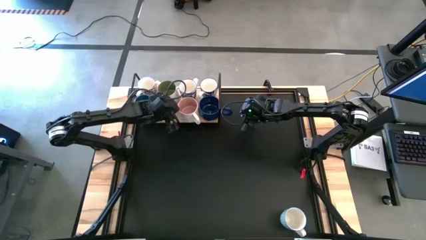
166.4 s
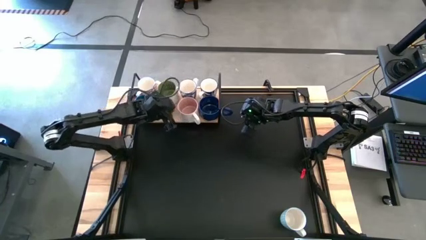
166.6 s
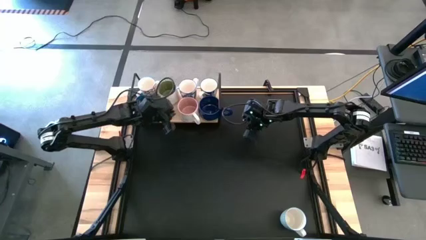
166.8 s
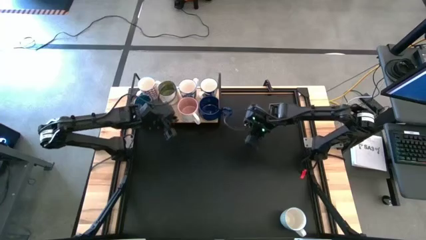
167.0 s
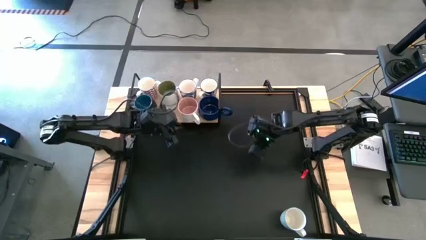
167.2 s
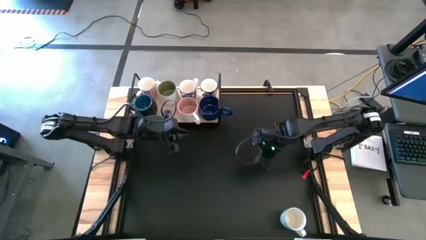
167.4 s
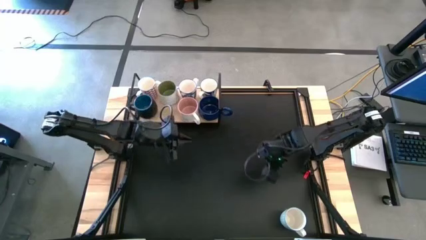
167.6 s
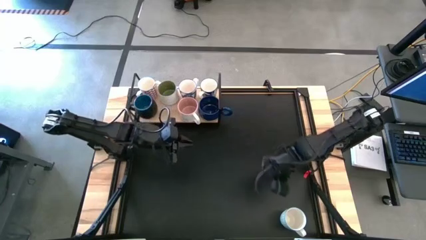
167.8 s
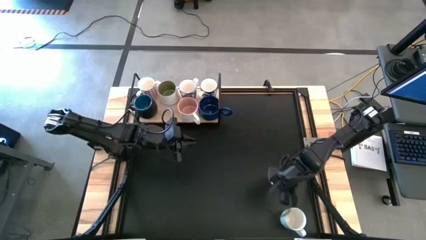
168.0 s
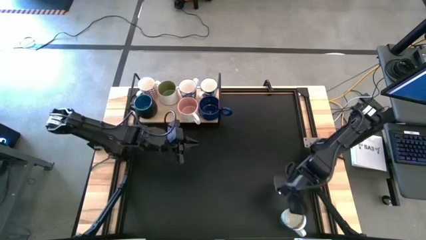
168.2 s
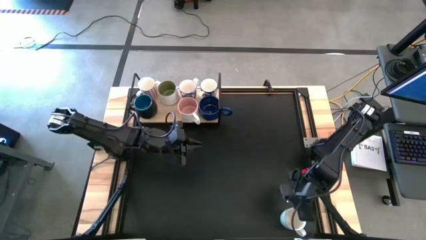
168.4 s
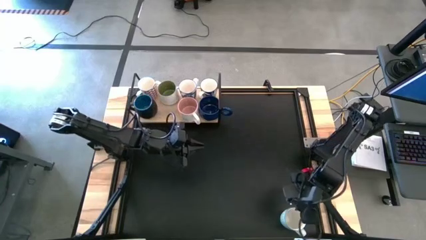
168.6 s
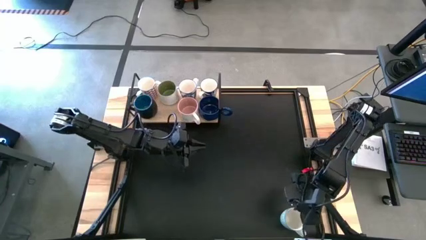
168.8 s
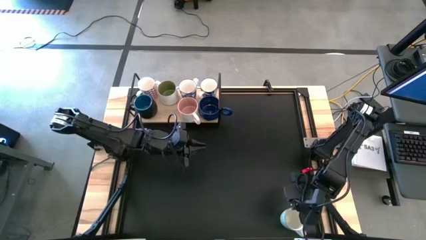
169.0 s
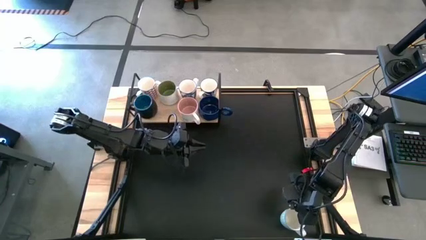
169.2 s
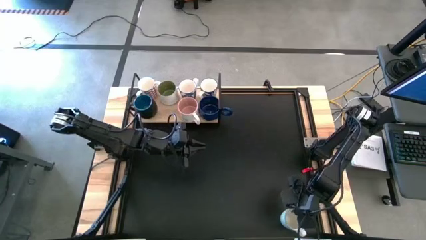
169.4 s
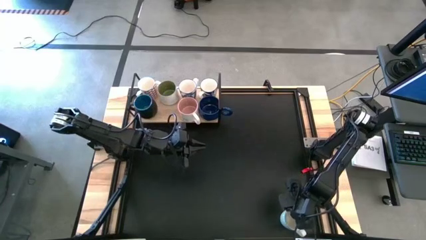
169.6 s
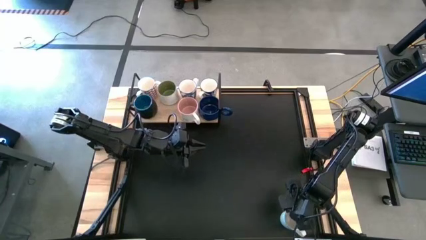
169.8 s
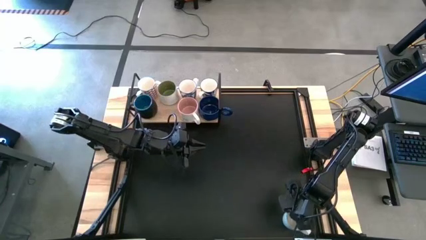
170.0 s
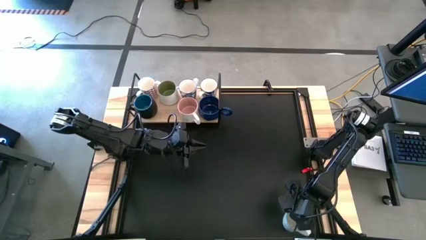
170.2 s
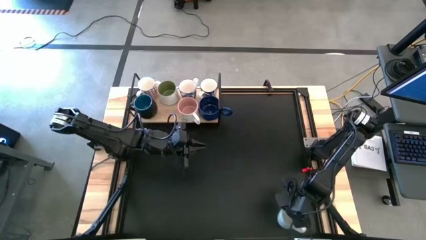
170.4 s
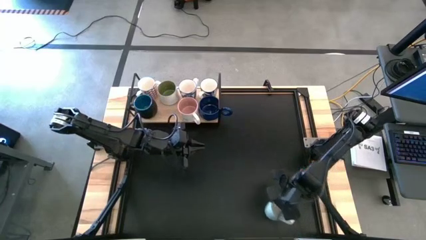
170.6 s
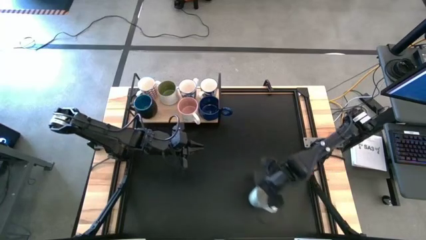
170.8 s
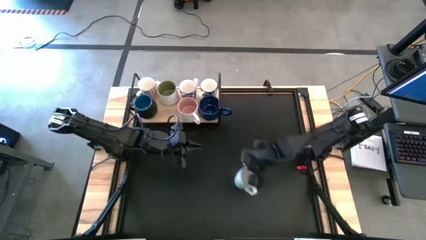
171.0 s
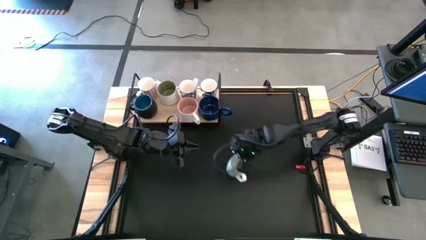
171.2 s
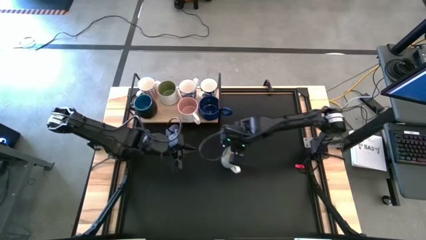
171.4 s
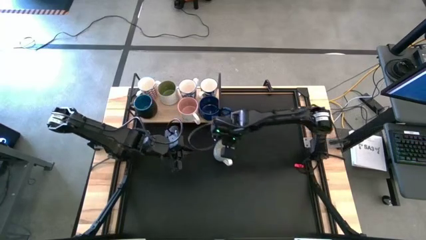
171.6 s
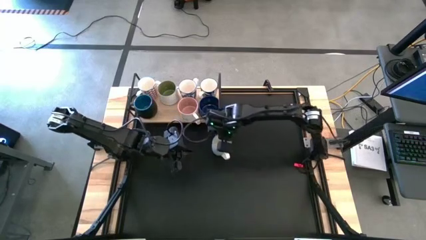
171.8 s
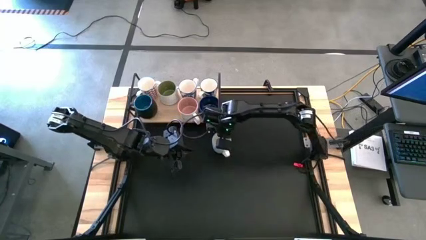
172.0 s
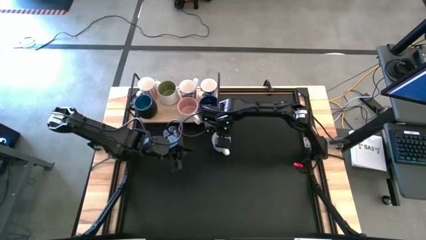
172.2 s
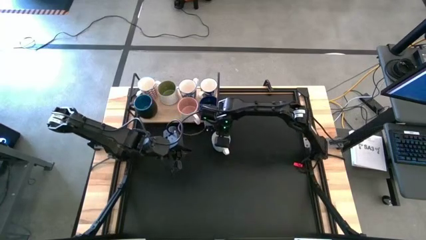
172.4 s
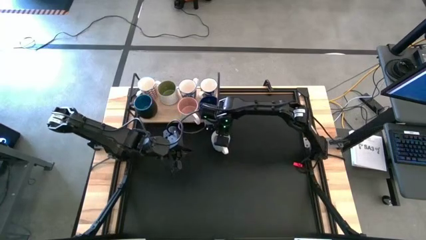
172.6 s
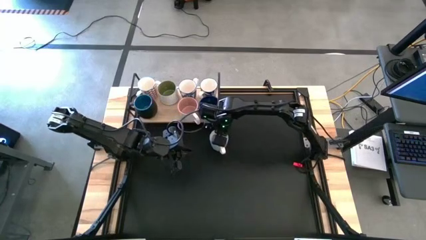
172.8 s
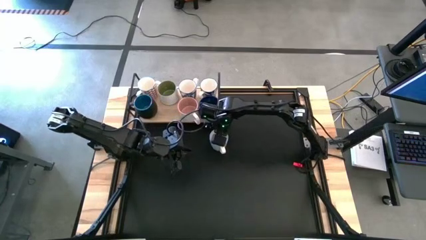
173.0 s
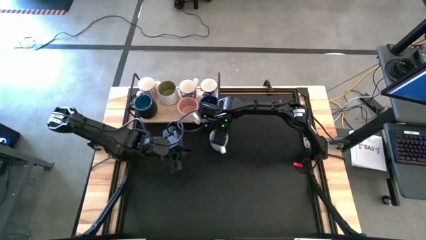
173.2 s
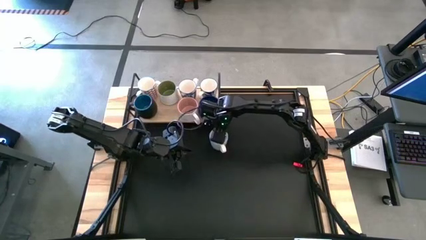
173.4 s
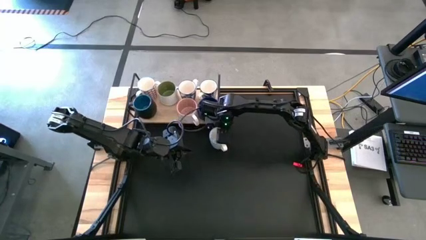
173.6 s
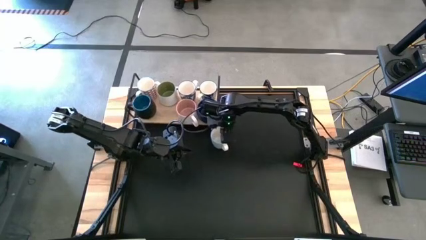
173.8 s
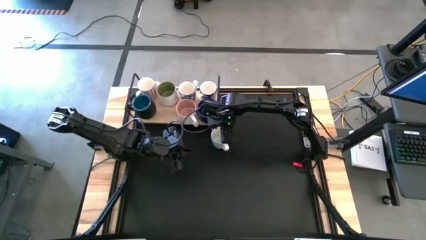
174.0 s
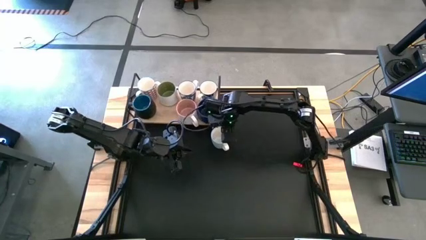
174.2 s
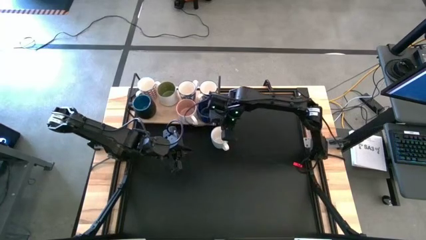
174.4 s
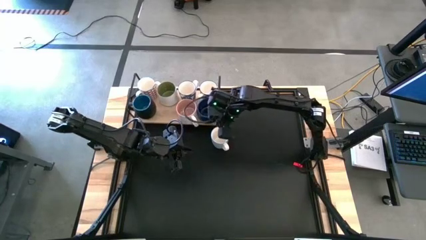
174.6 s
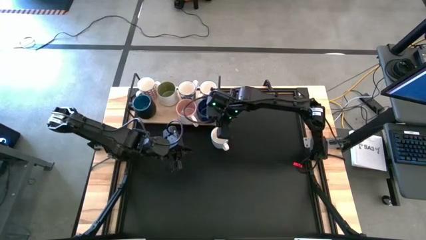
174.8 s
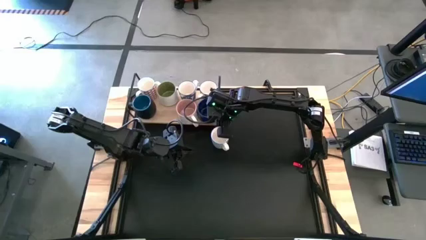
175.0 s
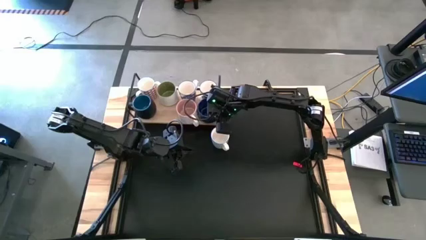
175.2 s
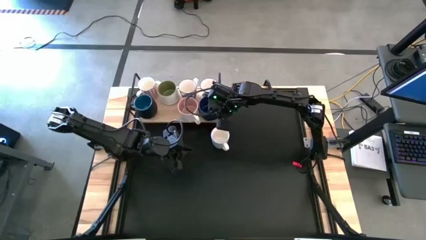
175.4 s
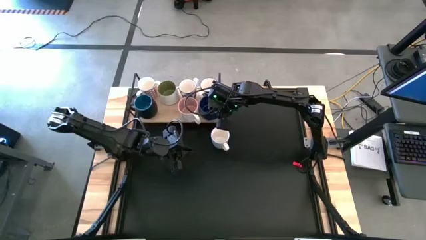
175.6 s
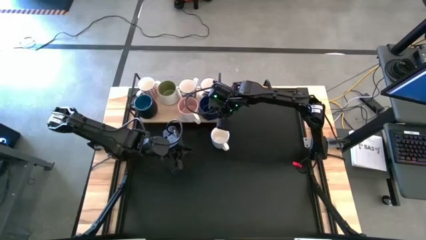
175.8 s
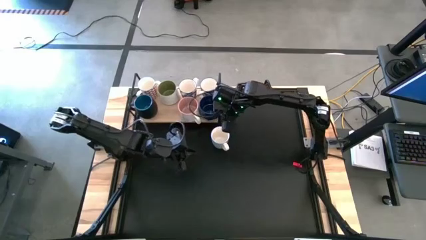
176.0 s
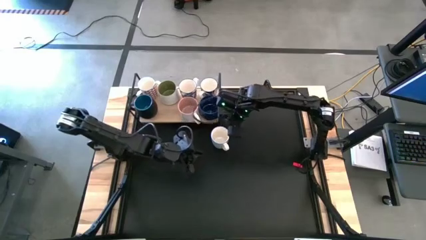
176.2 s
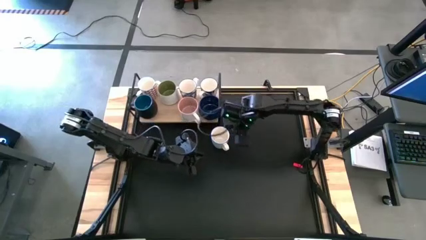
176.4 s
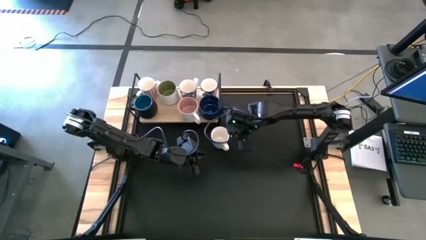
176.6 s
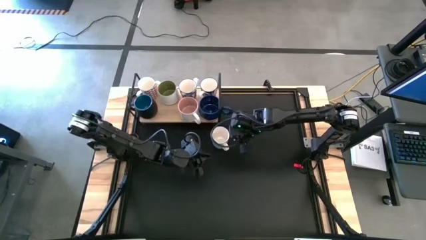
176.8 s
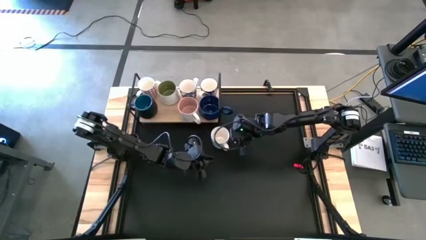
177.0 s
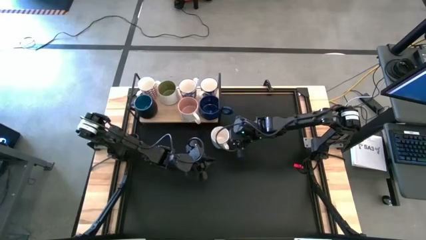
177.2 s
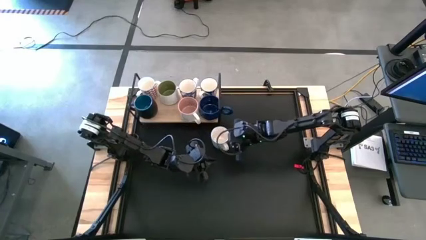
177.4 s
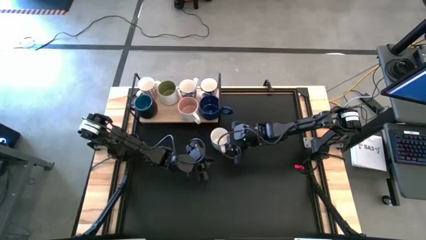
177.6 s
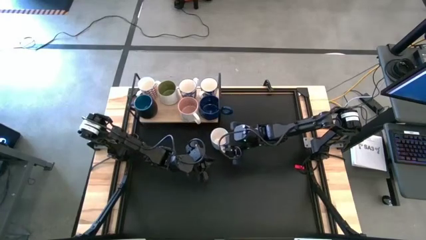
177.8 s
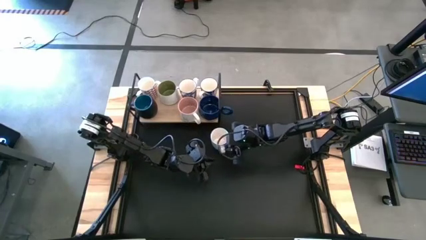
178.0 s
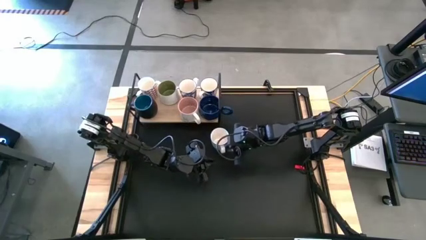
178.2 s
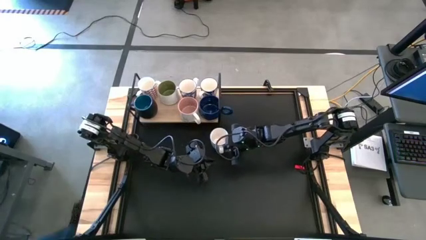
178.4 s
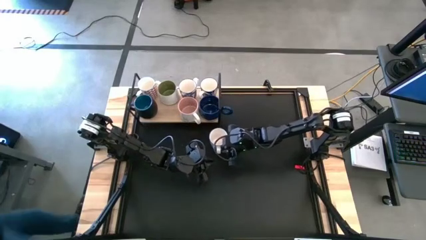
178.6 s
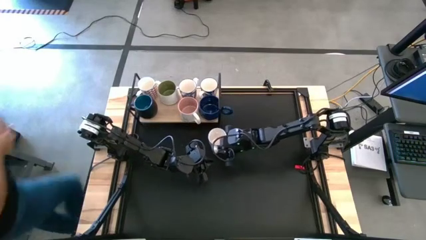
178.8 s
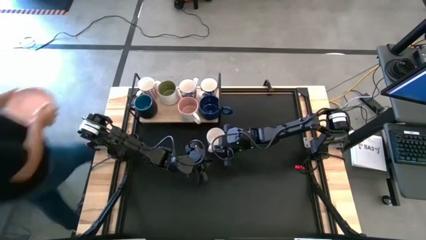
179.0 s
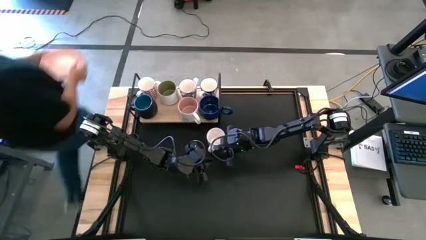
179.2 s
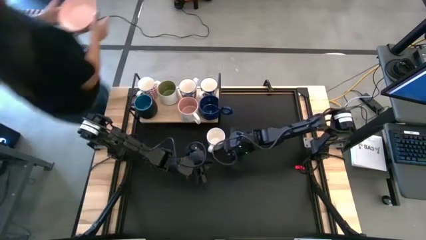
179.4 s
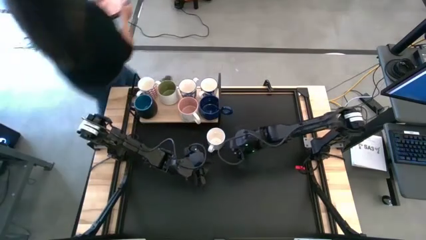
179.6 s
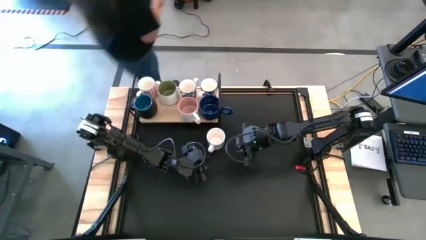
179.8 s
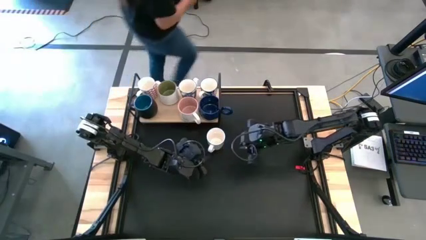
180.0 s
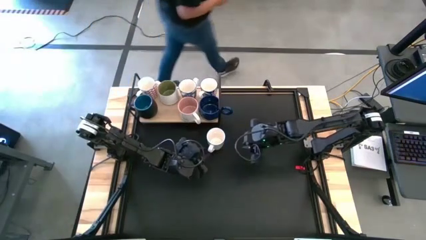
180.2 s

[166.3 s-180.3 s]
Task: Place coffee mugs
Put the gray patterned mug on the shelf

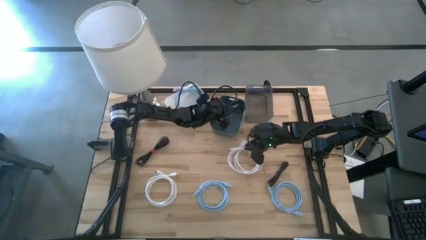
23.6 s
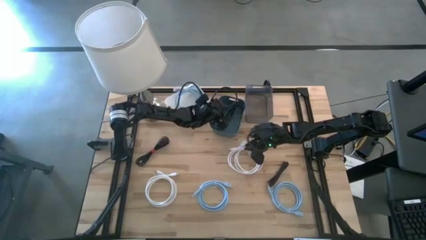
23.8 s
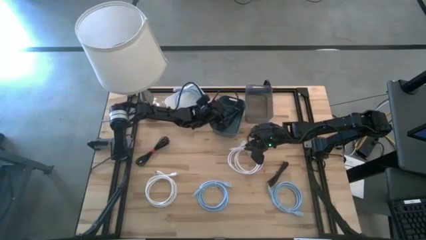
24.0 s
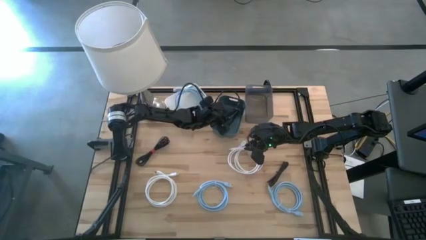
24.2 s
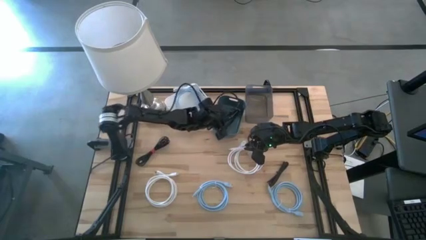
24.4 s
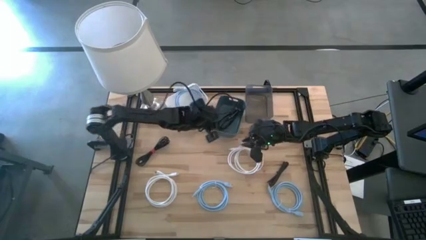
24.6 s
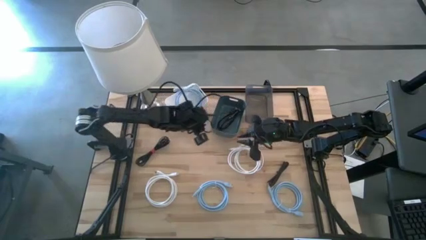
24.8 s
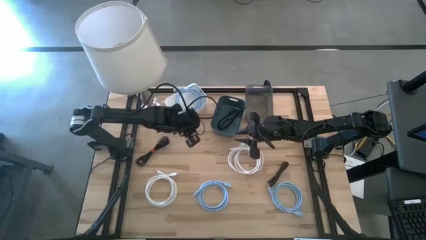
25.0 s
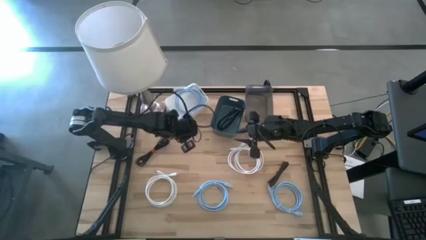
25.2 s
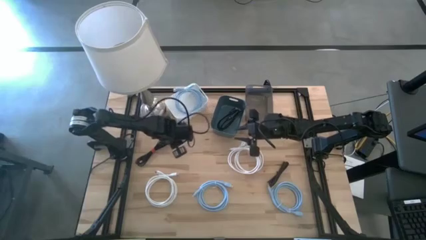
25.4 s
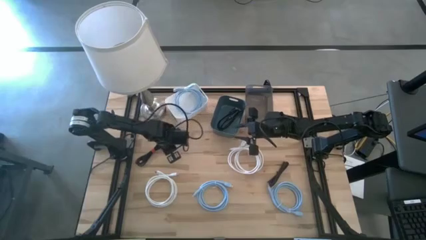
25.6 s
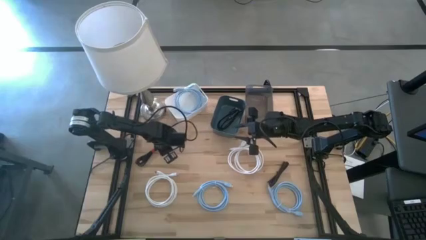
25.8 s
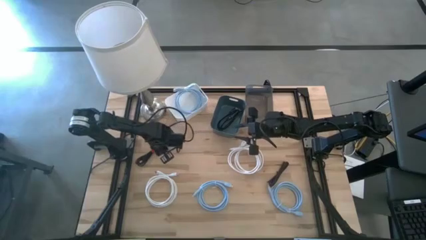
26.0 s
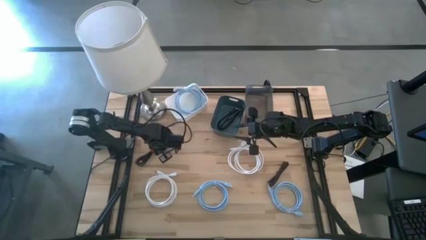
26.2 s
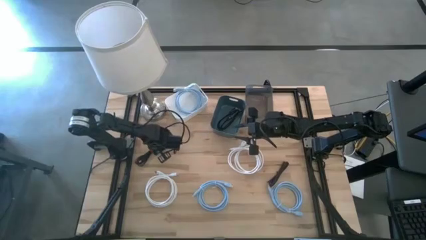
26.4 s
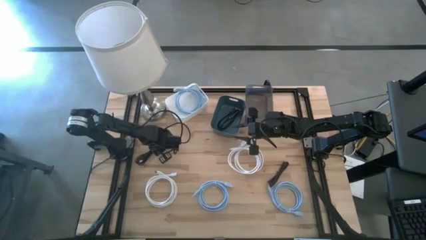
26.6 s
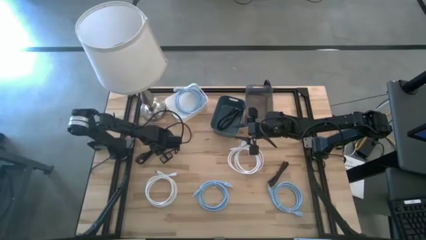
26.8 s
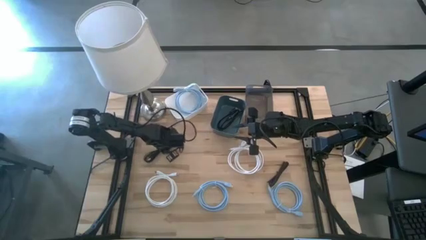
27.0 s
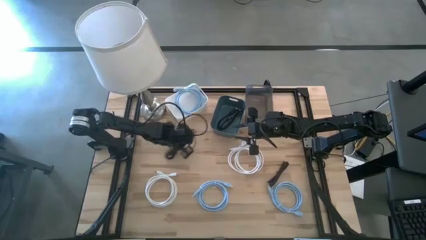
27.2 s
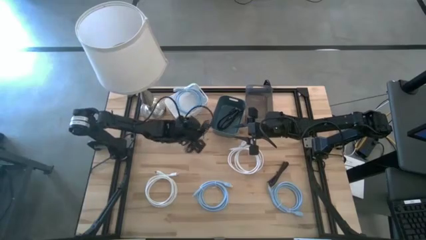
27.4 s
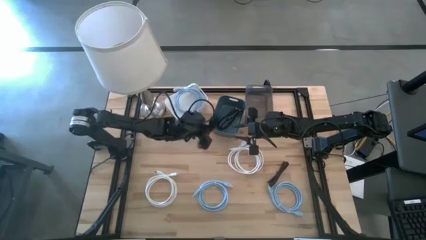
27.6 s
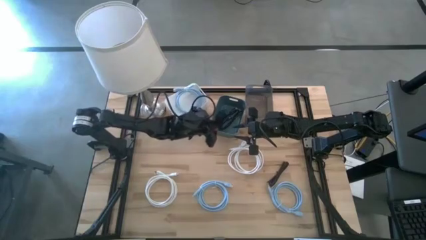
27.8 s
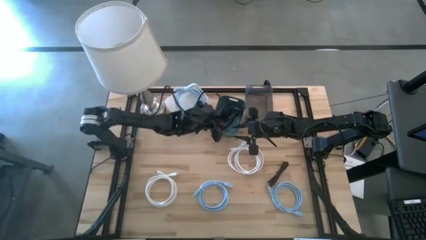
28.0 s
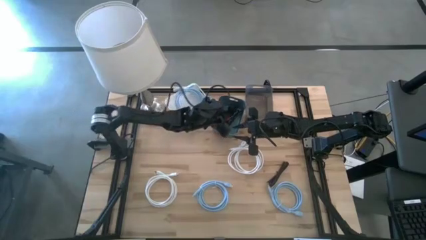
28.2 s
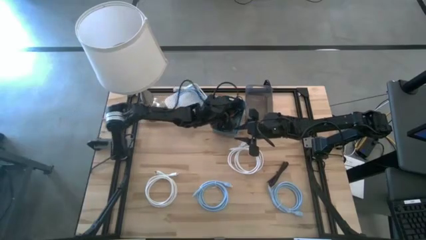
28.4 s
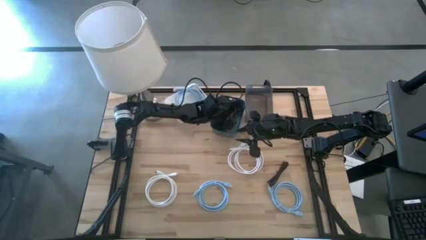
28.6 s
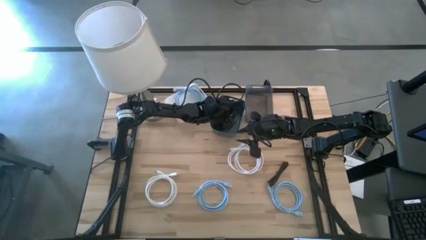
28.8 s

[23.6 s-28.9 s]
Task: Pick & Place USB Port
Put the left black cable into the blue bin
